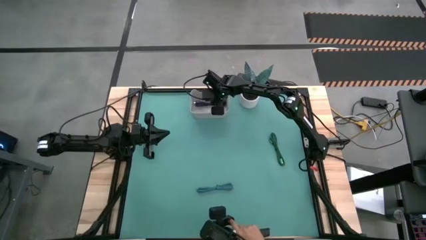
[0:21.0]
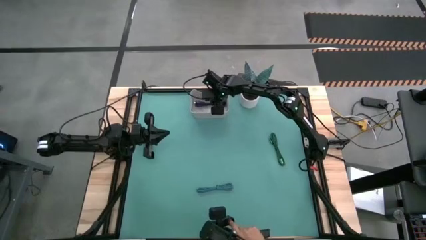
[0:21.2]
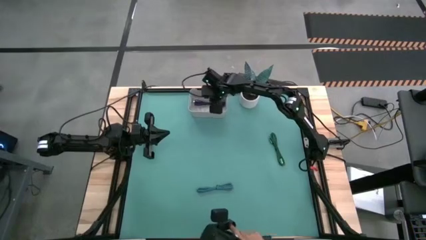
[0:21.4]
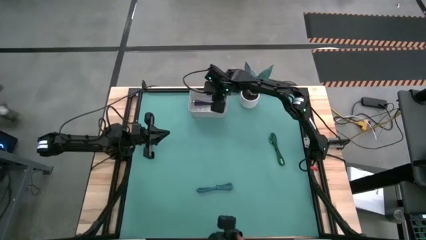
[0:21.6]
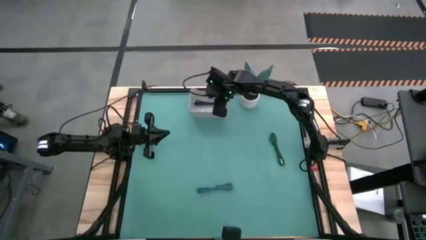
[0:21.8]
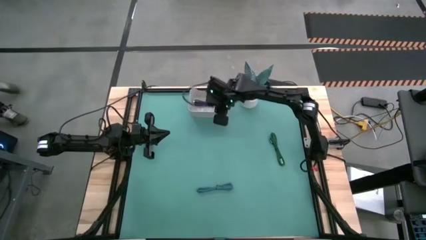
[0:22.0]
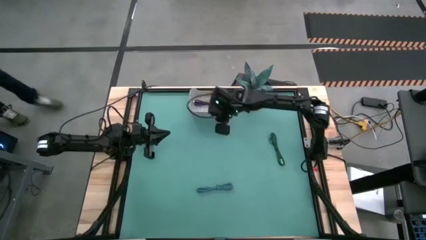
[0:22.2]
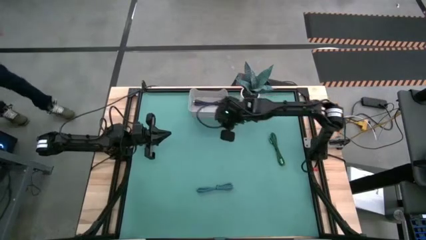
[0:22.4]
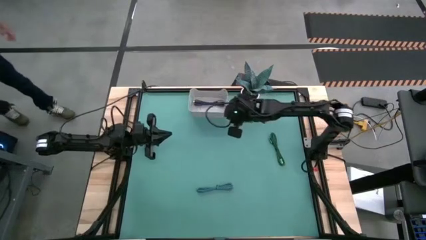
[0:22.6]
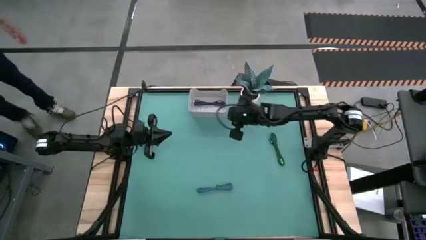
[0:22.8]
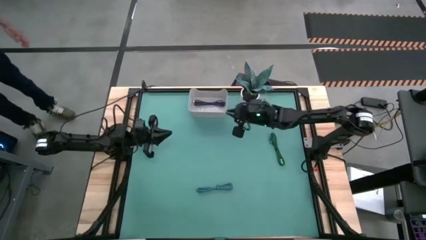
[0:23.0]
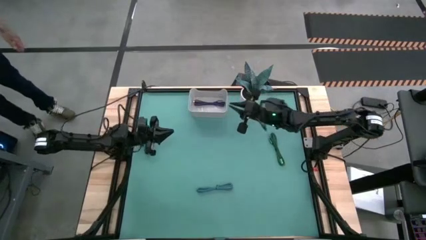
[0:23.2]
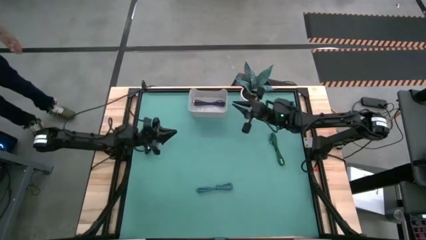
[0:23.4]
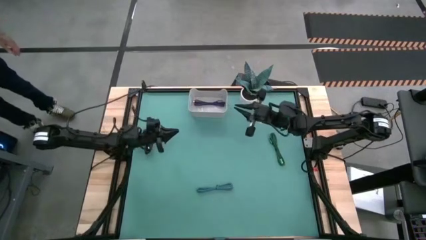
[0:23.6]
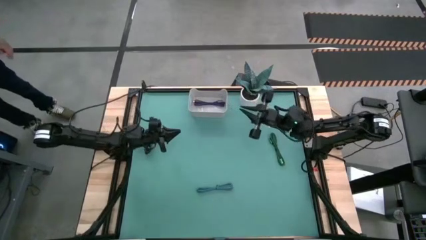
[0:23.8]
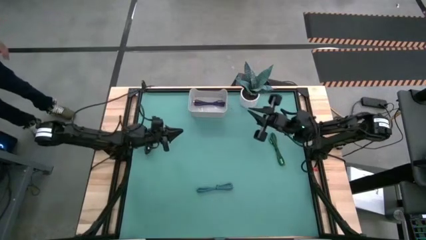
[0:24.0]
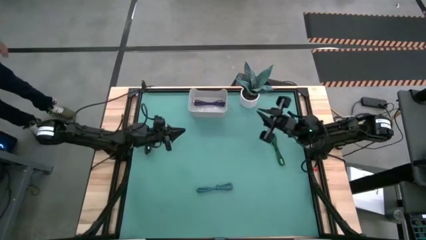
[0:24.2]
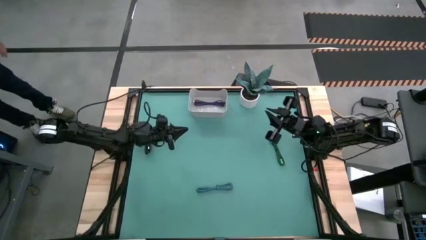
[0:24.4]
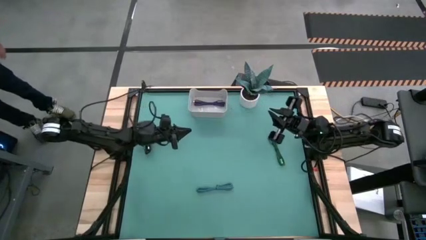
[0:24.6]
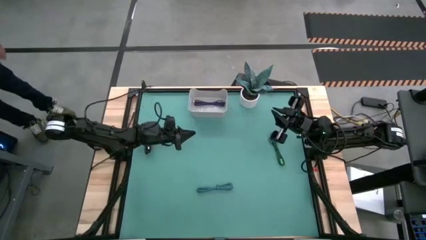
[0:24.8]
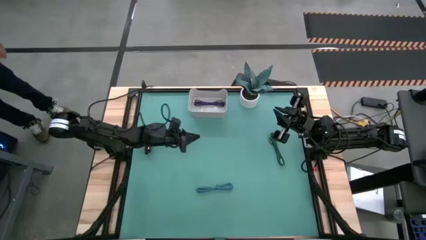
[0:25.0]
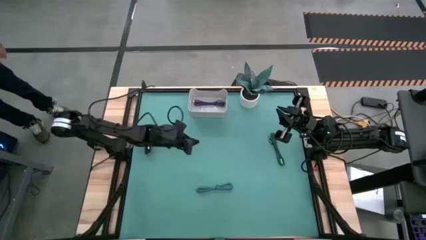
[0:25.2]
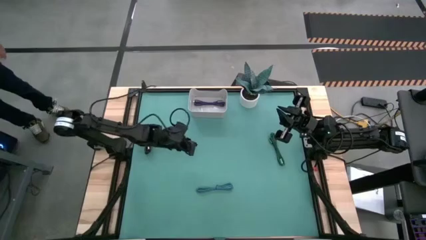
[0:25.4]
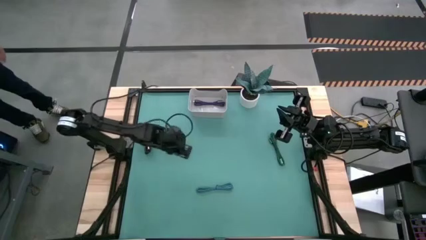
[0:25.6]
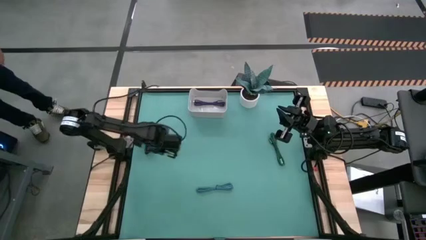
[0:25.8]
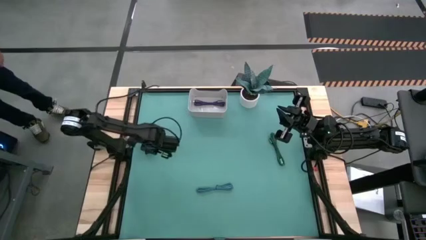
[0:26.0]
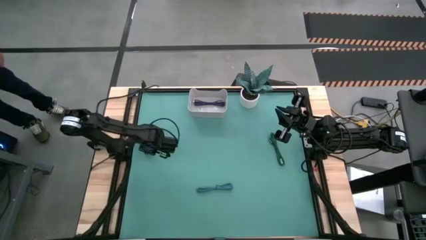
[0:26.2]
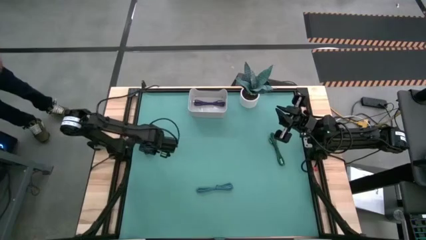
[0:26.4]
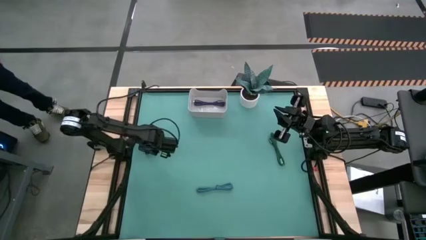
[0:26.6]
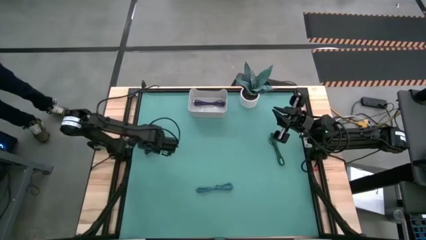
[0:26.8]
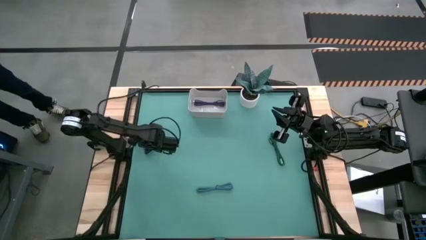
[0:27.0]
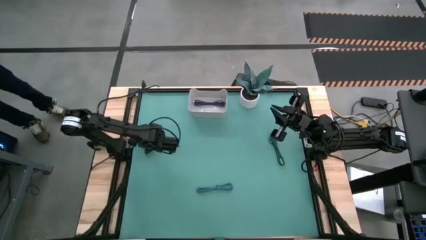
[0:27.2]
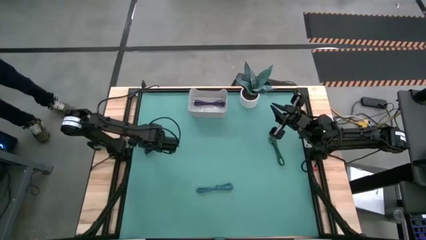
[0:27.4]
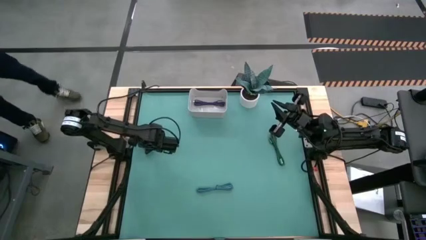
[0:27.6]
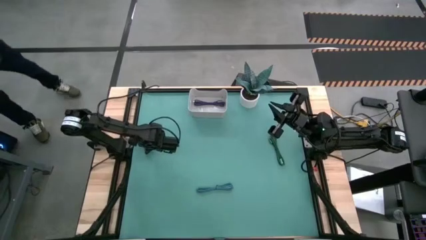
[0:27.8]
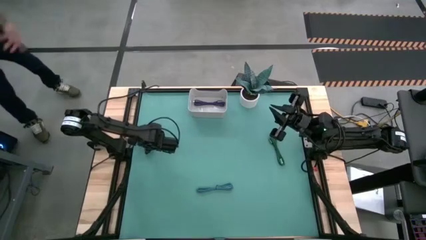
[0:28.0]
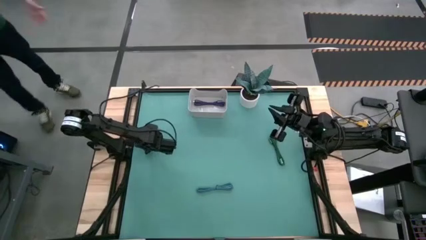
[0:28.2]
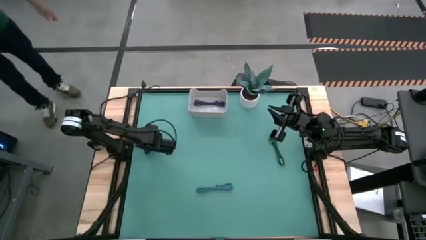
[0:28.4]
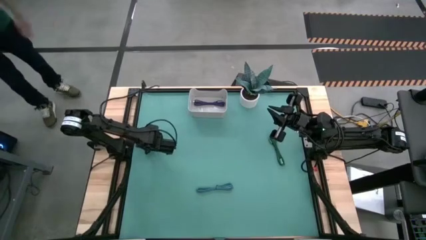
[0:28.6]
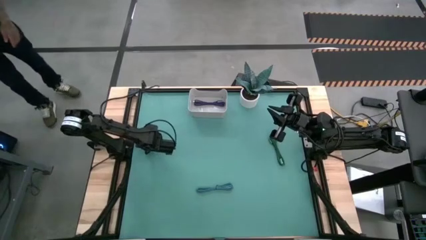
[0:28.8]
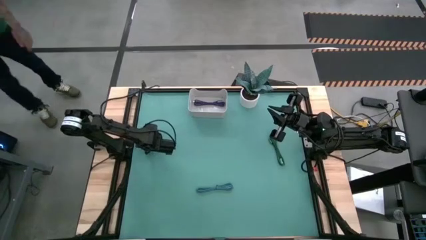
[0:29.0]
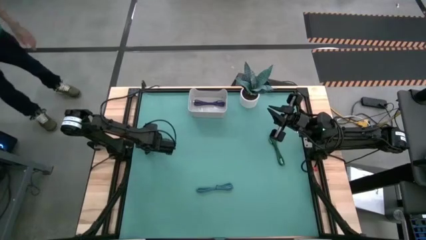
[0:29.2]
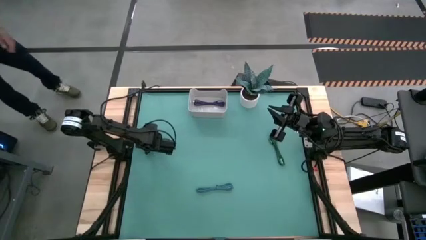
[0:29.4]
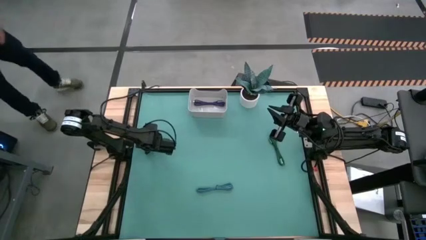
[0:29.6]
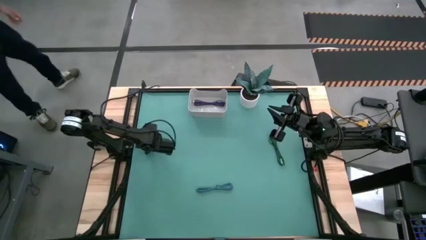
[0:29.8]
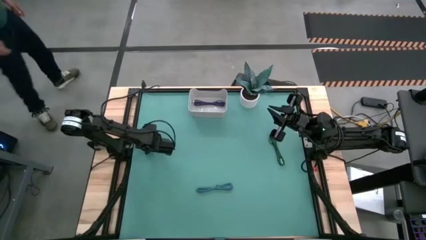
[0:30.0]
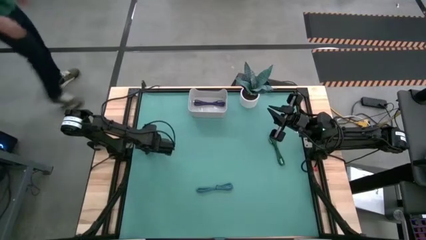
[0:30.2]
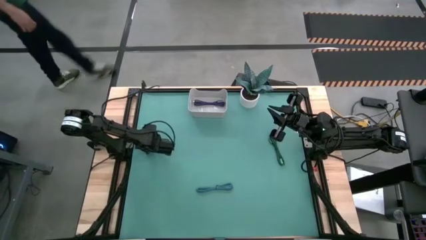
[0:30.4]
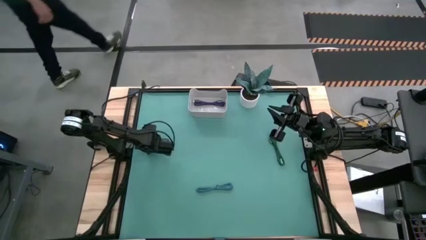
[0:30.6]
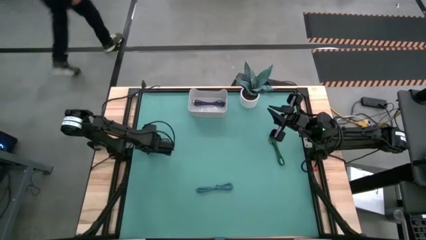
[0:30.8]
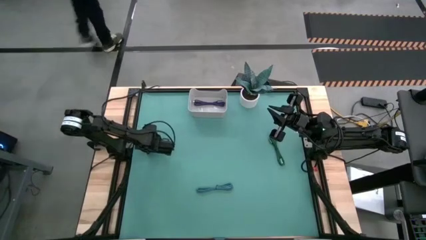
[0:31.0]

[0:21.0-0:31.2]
Task: Pick and place USB-C Cables
Put the black charger cable into the white bin

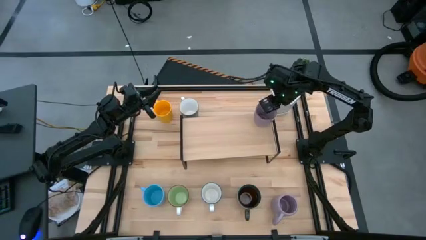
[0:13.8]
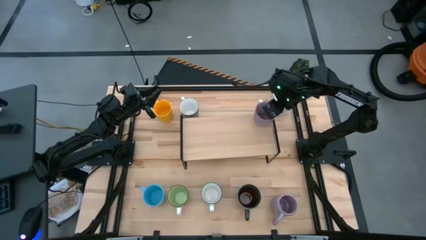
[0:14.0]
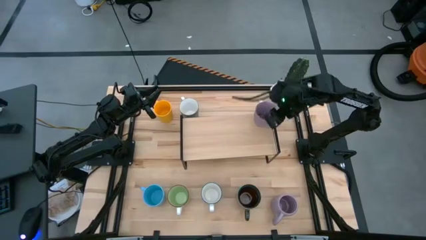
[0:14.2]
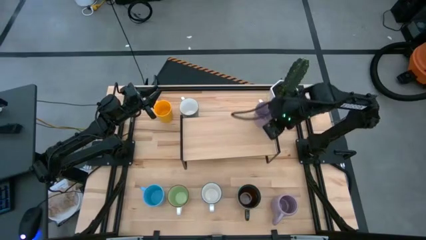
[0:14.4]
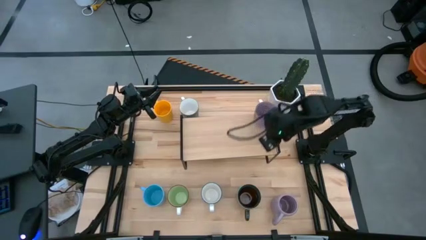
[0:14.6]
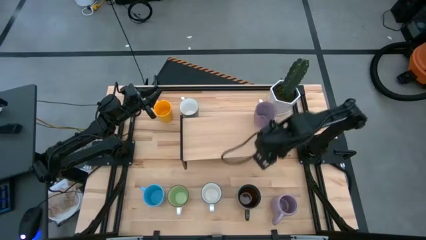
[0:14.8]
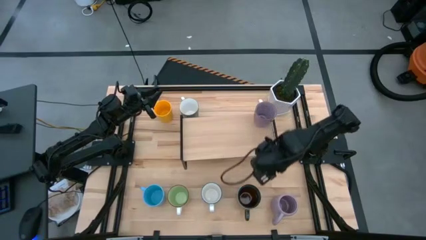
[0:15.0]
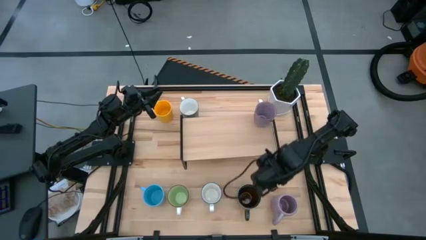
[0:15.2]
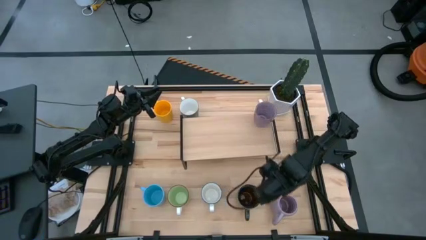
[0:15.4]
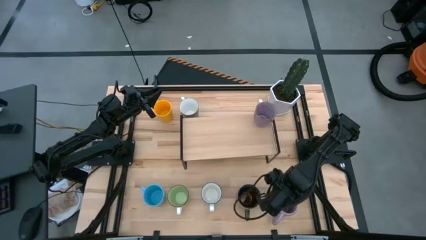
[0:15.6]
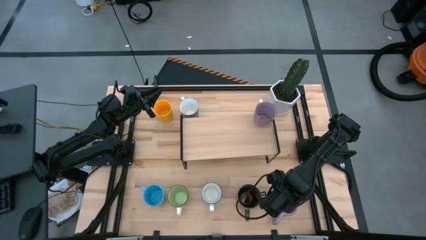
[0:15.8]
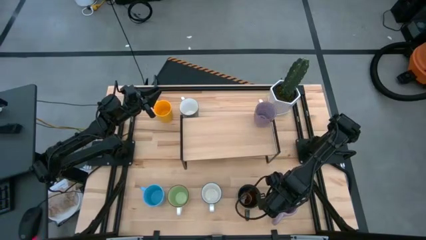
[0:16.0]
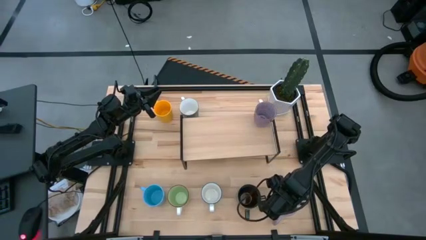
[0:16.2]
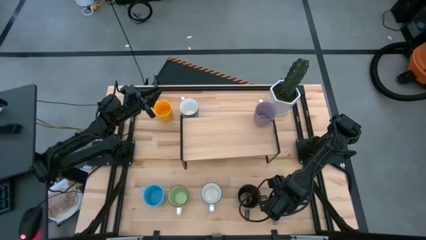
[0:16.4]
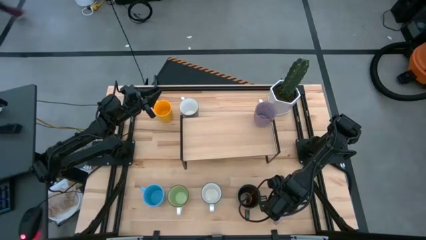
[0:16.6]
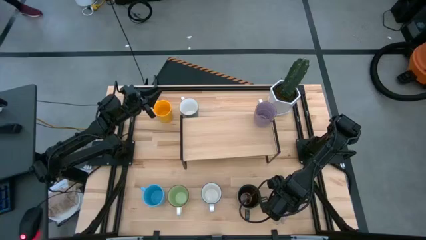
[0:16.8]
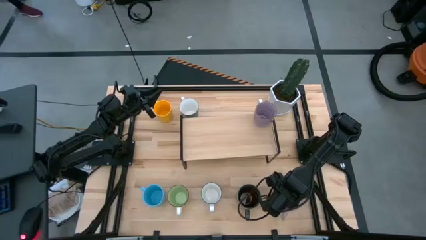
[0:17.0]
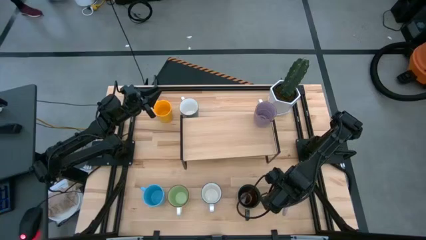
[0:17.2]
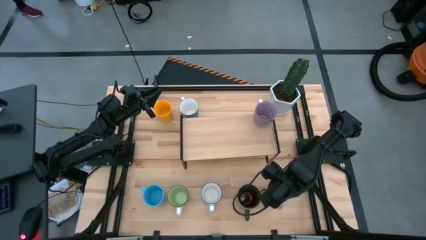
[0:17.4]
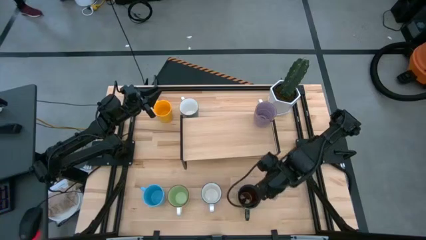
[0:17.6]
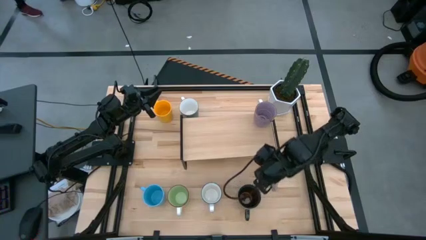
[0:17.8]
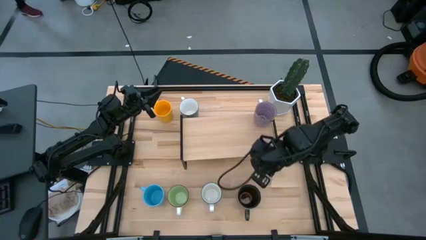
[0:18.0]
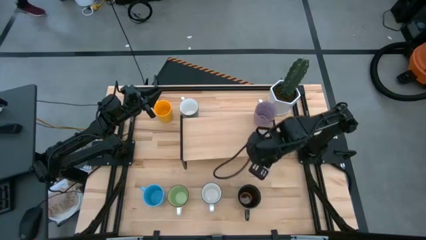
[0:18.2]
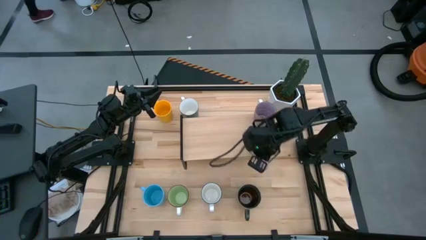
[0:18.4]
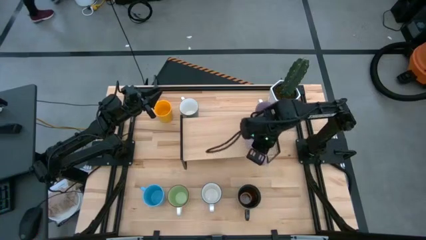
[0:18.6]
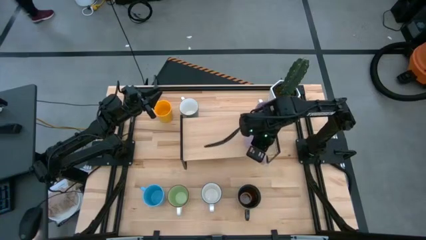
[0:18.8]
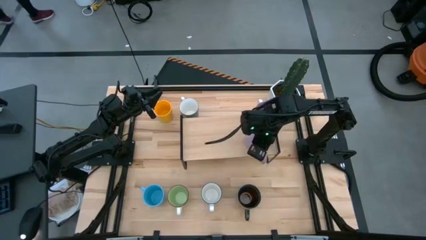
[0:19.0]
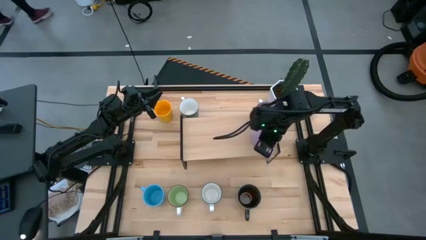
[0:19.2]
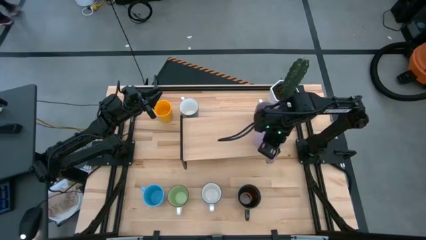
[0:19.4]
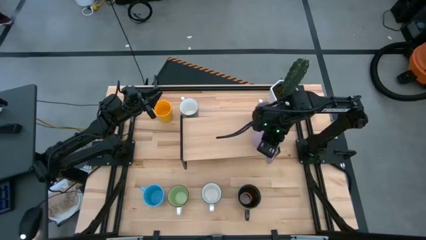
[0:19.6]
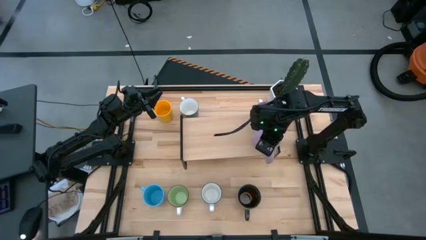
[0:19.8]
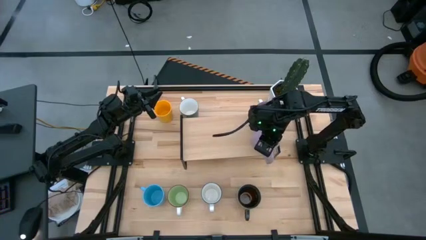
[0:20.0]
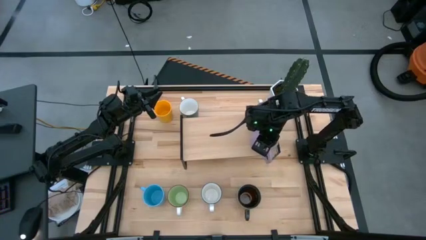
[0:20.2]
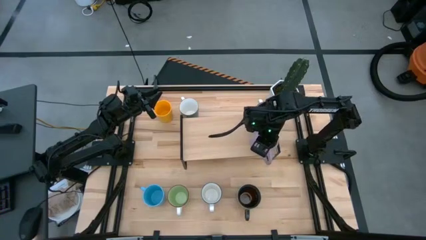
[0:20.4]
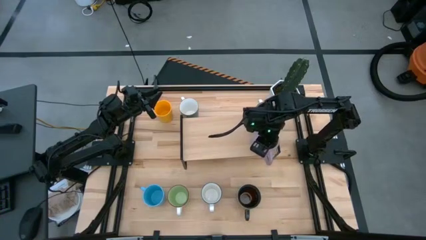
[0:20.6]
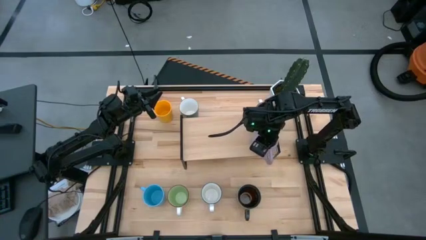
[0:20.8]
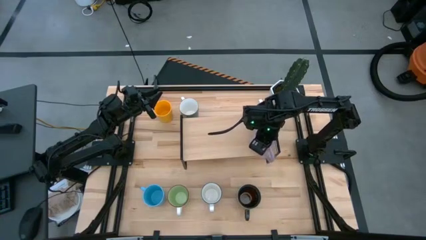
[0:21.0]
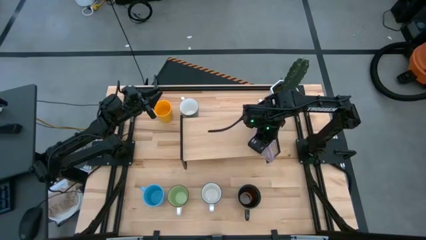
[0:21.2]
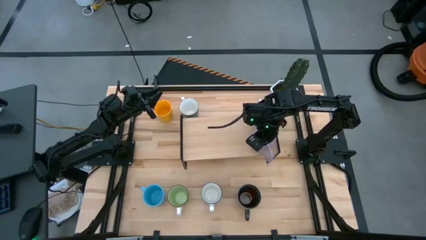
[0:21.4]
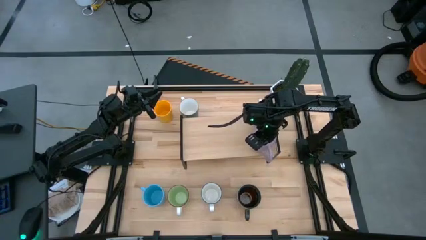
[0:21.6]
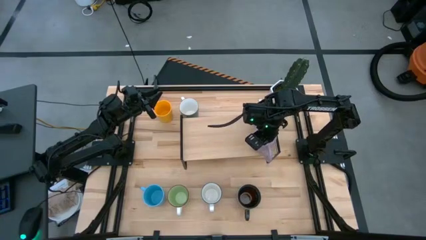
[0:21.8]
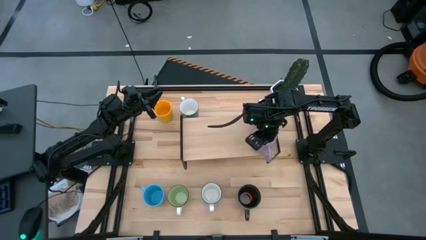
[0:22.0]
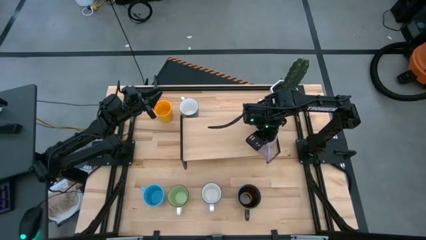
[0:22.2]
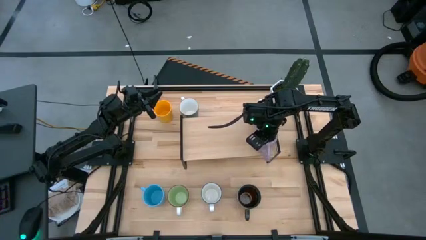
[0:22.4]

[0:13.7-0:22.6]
Task: Place coffee mugs
Put the purple mug on the shelf
